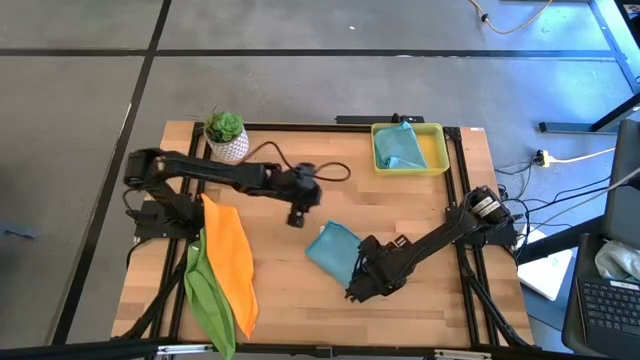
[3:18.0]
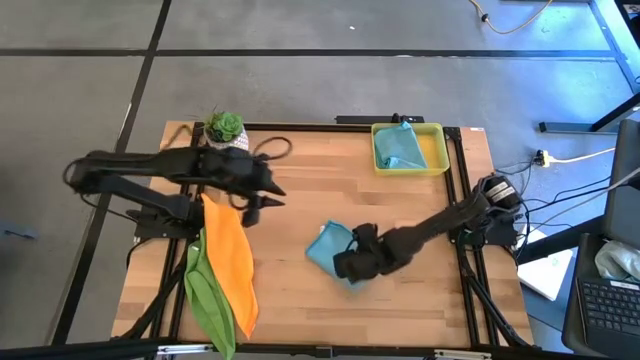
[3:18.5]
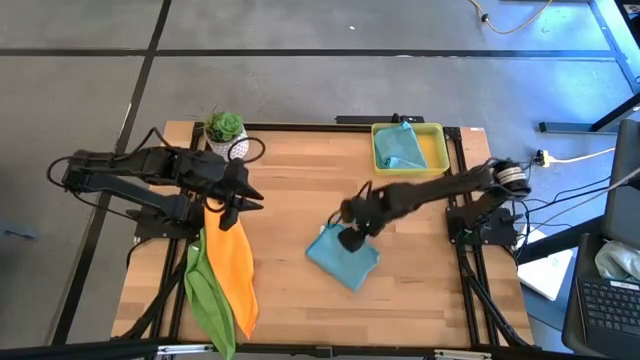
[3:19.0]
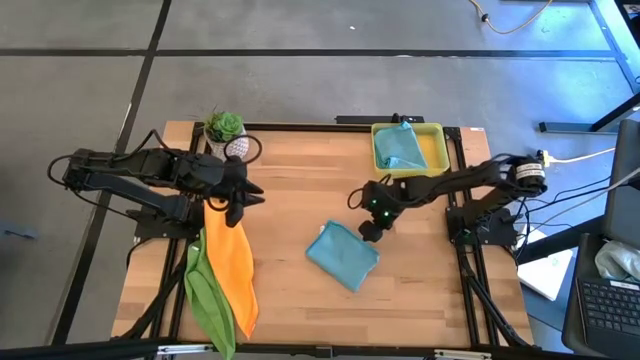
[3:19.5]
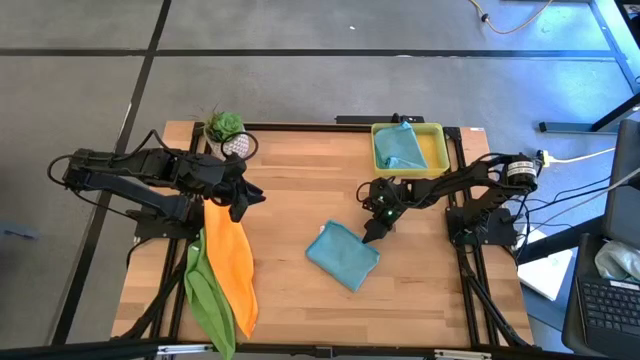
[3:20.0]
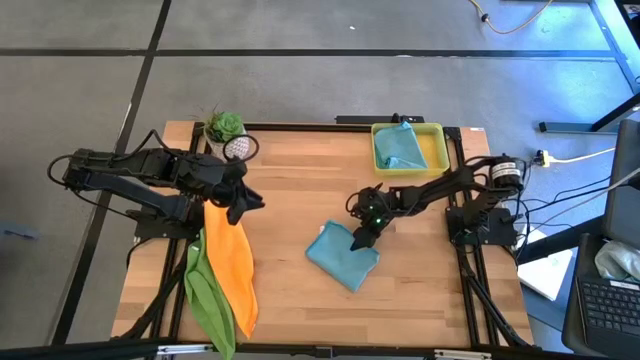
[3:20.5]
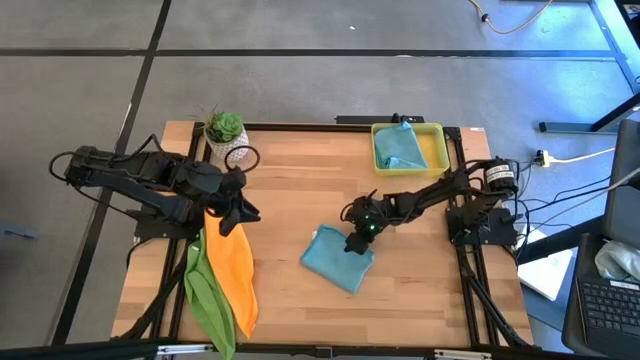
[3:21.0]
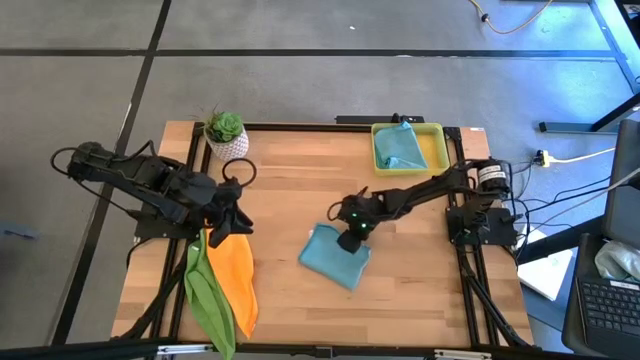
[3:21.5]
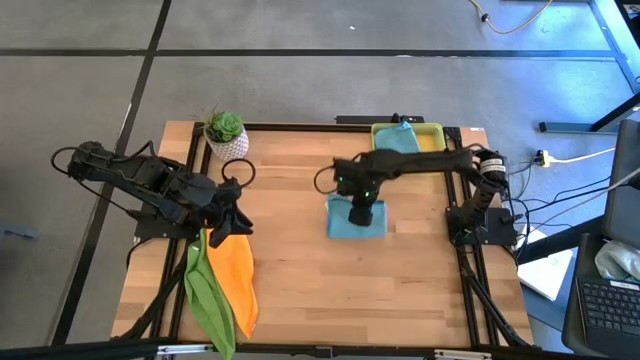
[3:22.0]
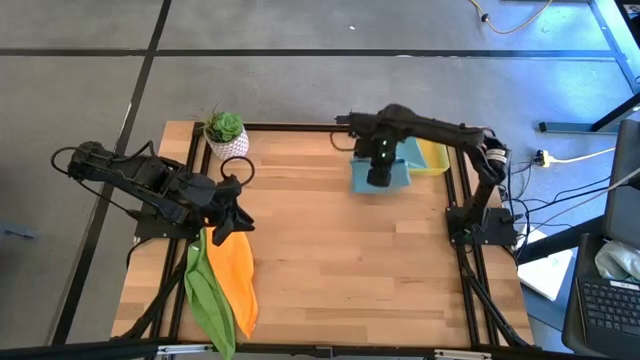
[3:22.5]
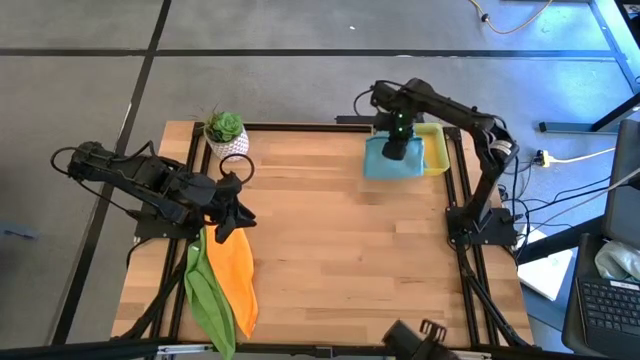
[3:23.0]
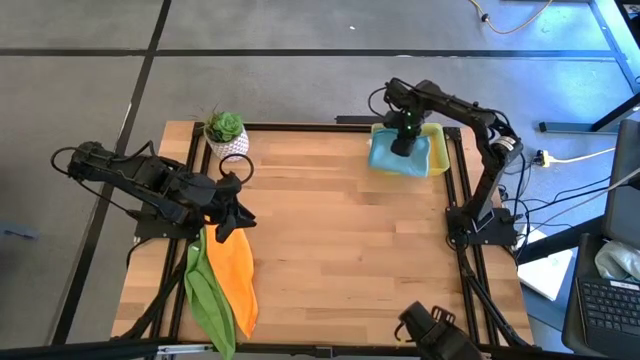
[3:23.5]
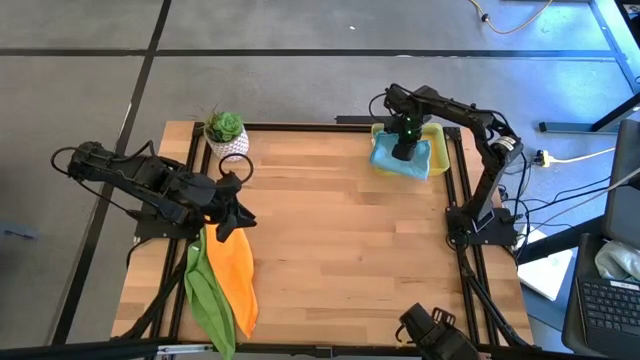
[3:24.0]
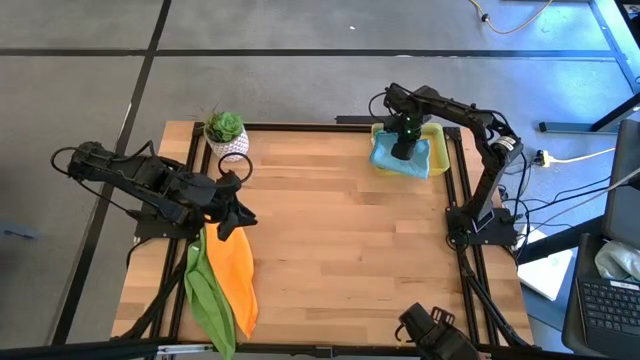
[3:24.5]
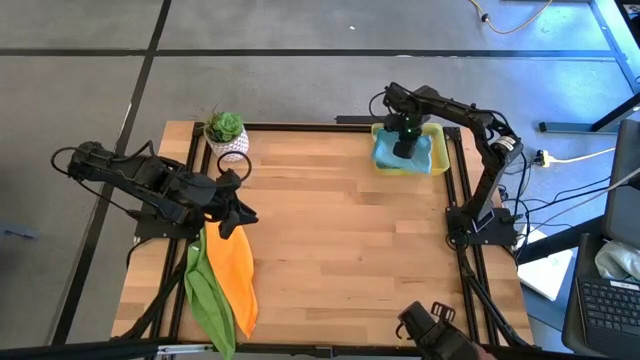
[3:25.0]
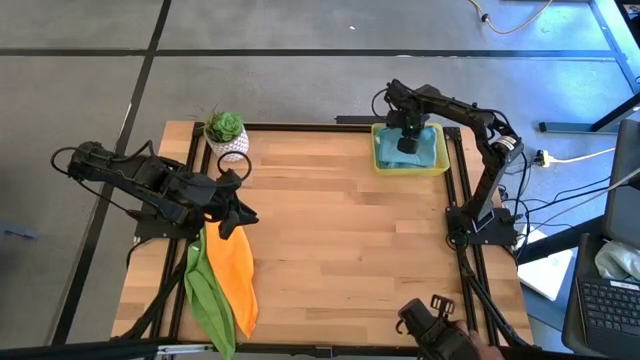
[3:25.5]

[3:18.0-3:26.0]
Task: Fold microfiber towels
Put the folded blue microfiber towel into the bin

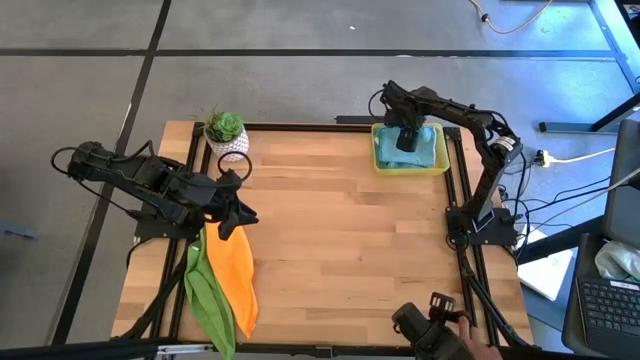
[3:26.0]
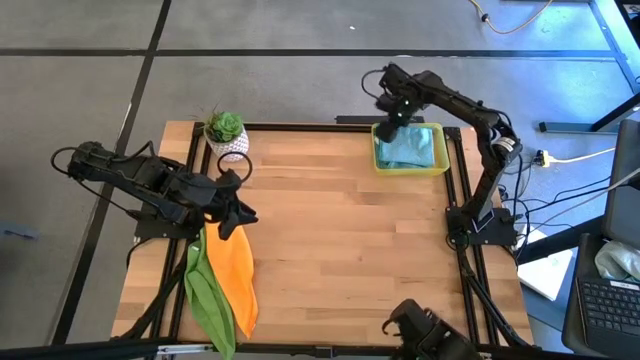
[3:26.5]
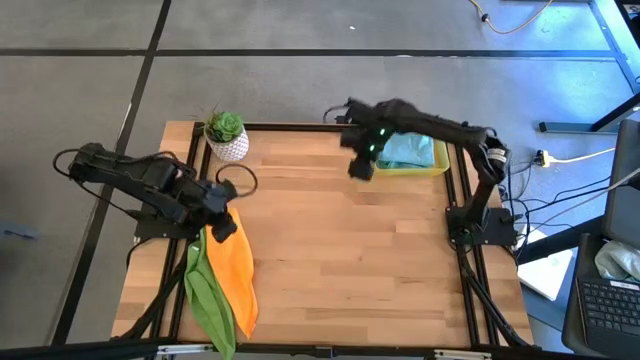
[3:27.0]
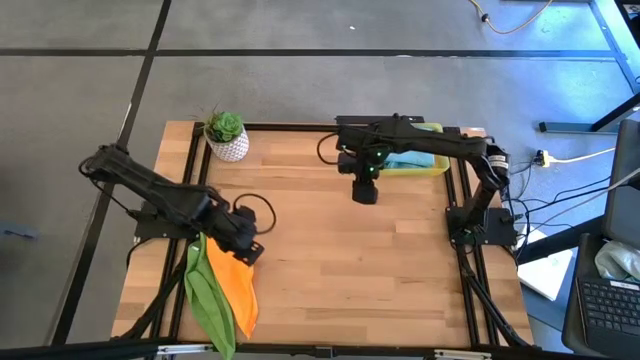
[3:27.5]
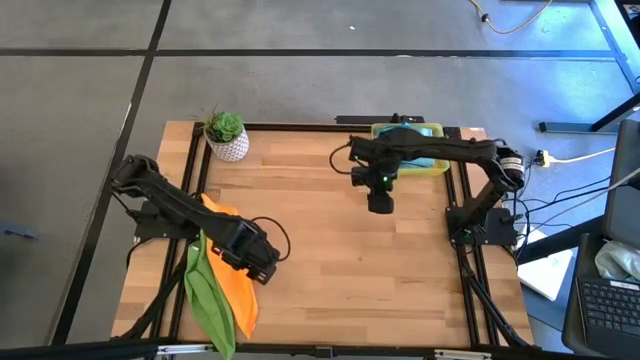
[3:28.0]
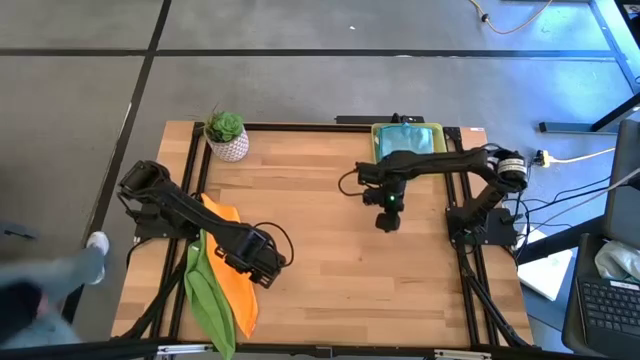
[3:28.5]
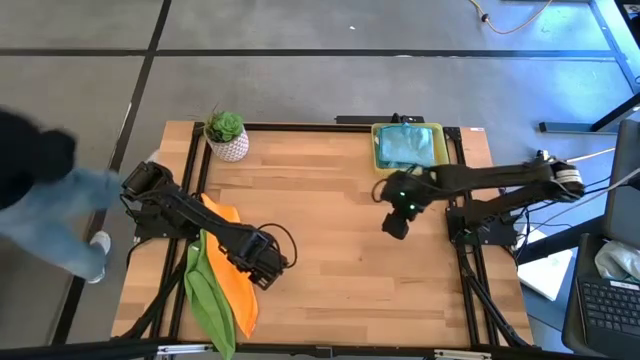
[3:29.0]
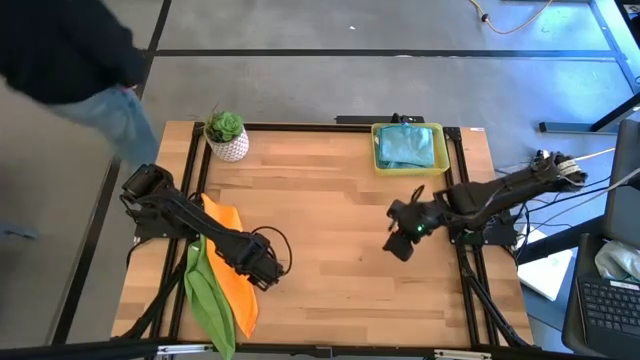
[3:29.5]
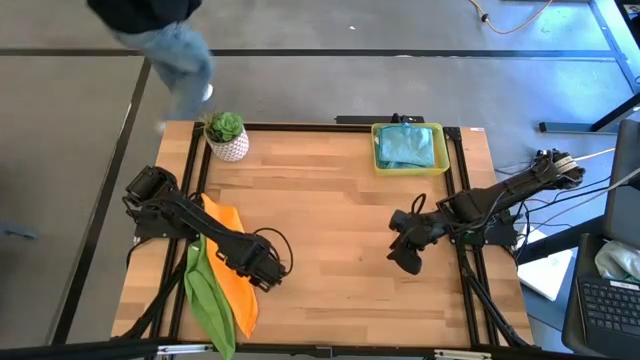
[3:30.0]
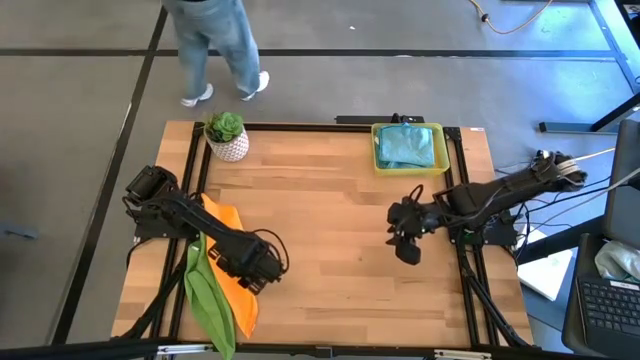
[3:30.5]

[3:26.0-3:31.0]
Fold the orange microfiber towel

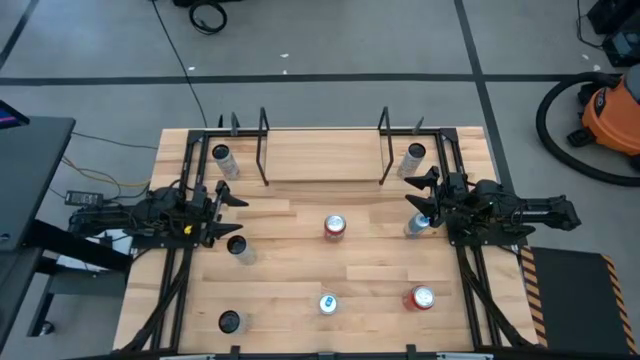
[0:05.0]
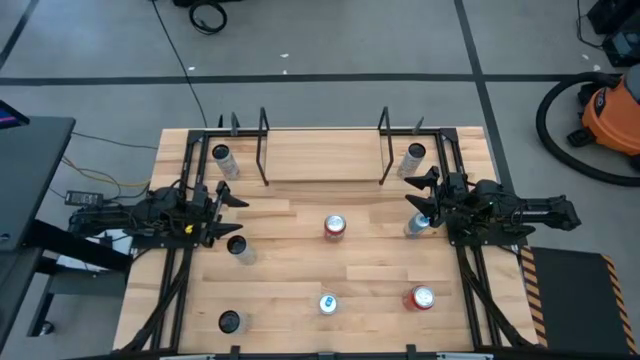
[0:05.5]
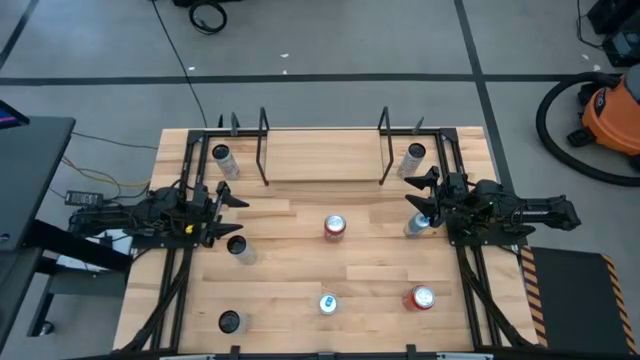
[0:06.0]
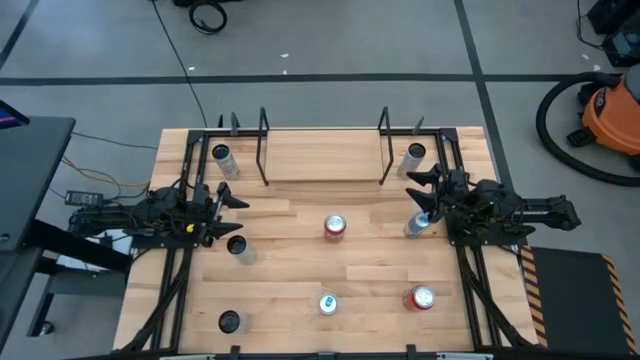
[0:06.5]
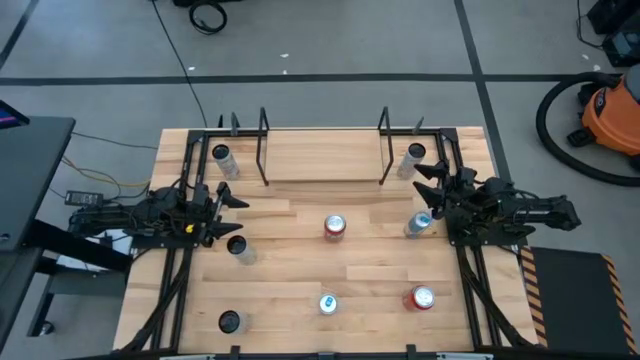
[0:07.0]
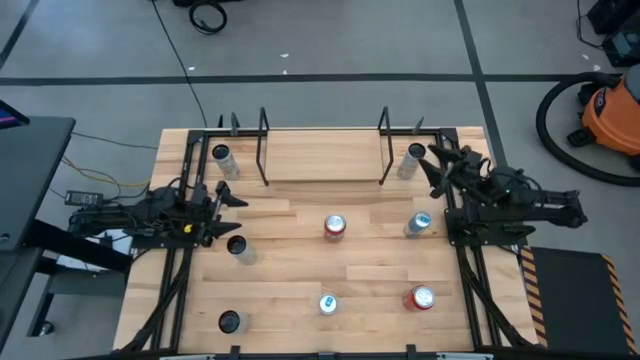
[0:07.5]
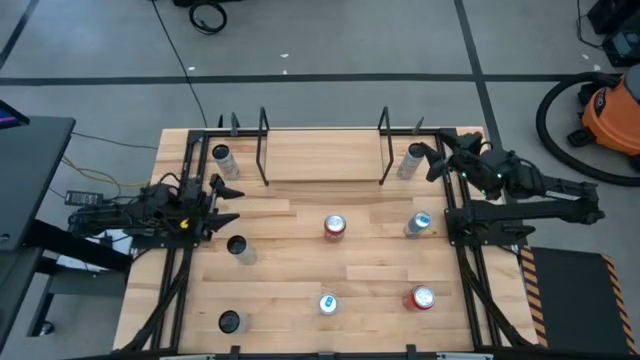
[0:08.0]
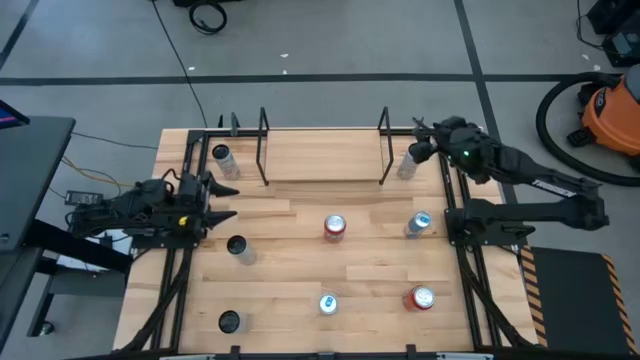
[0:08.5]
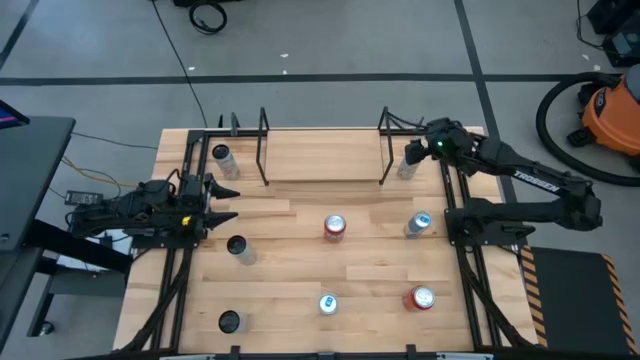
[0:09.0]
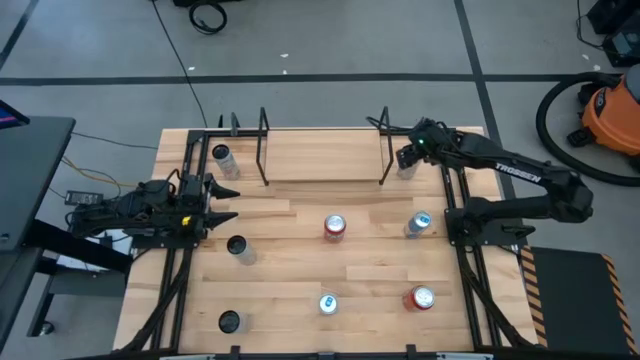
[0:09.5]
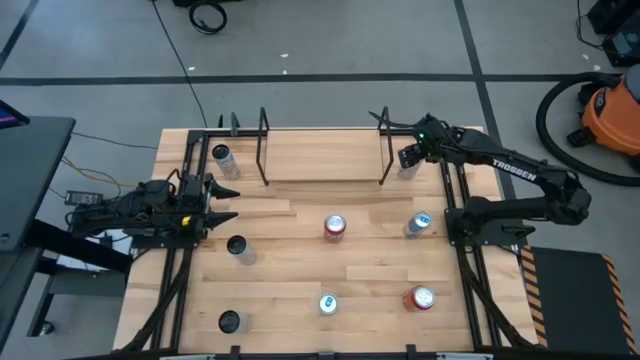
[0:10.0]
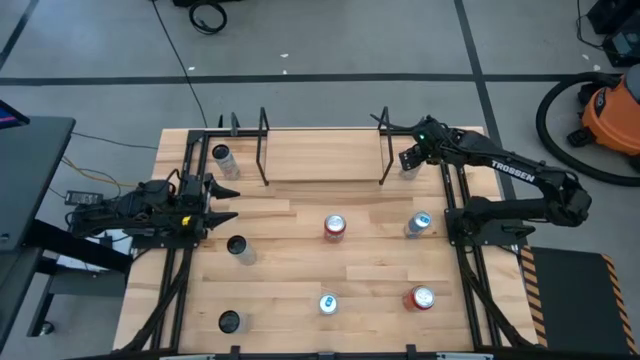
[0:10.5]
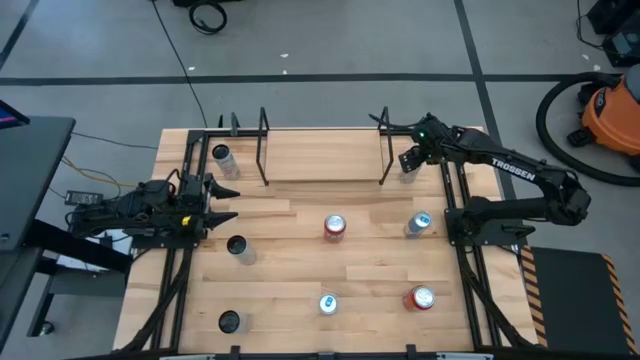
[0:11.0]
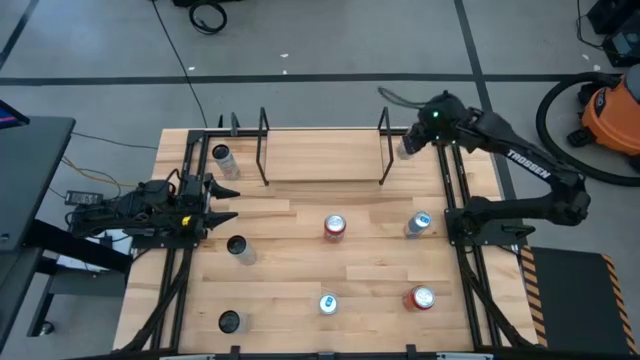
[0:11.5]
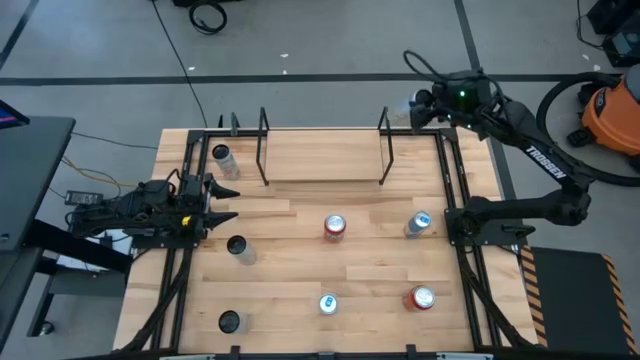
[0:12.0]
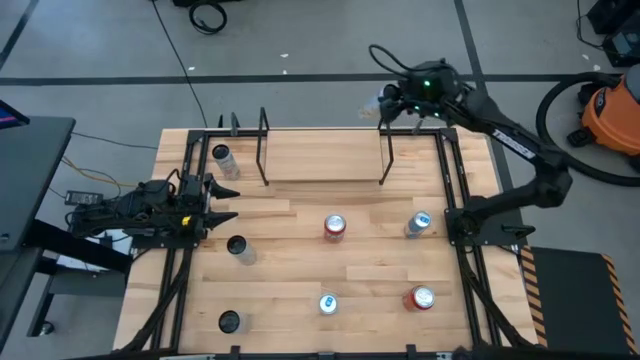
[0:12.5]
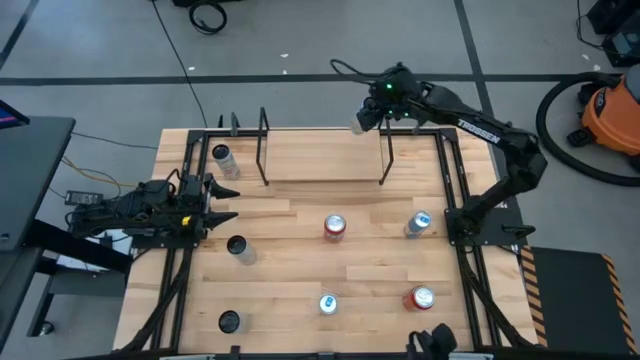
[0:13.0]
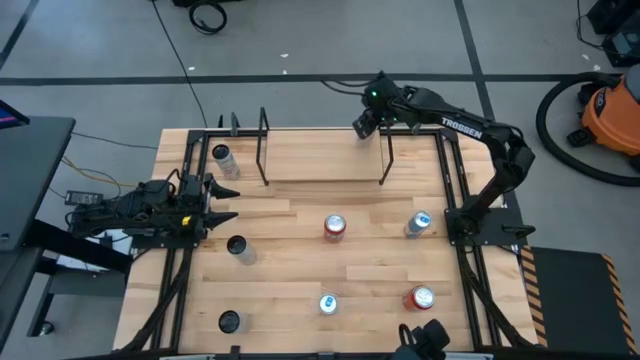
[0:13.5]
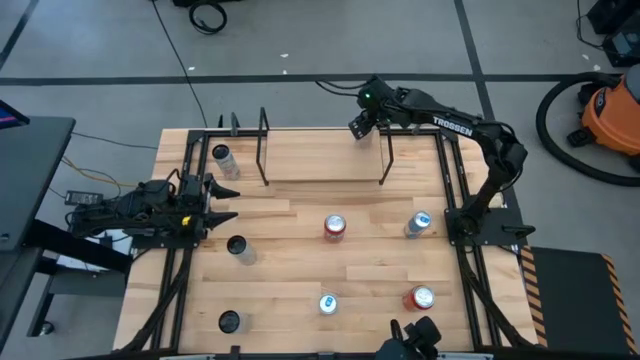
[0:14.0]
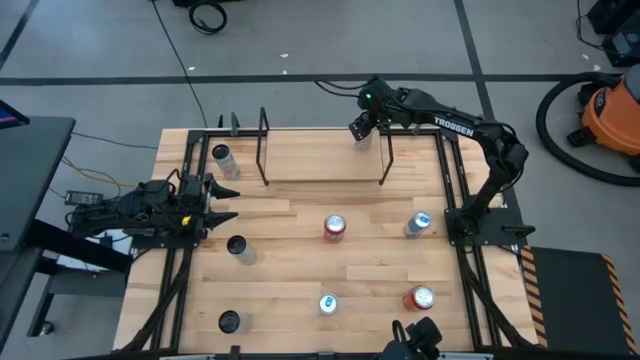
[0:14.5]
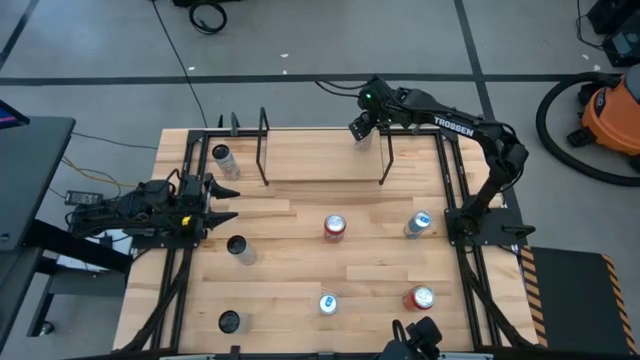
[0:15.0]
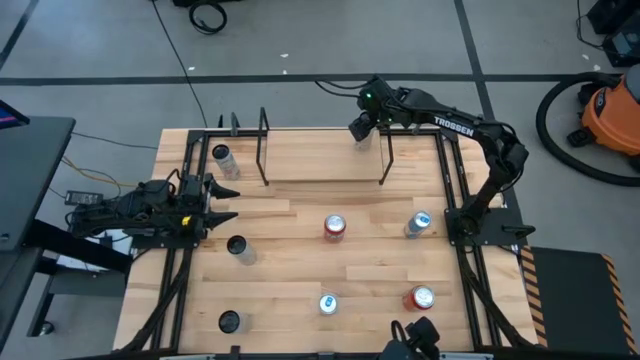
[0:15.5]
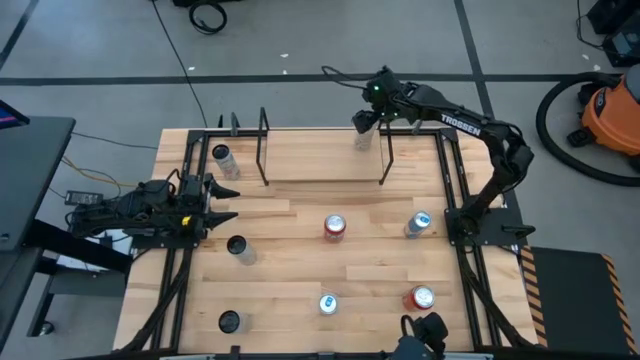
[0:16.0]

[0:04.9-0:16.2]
Task: Place canned beverage on shelf
Put the top white yellow soda can on the shelf
